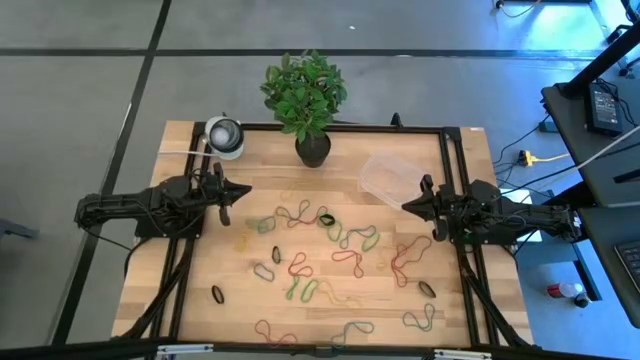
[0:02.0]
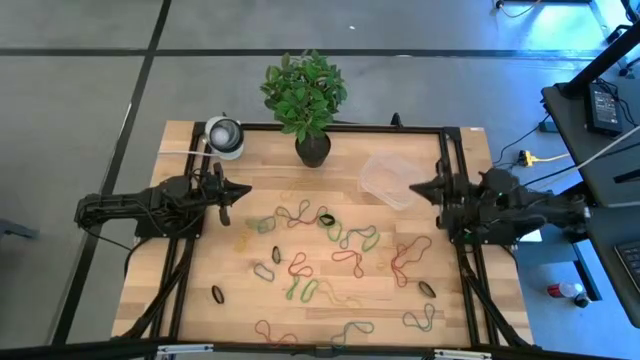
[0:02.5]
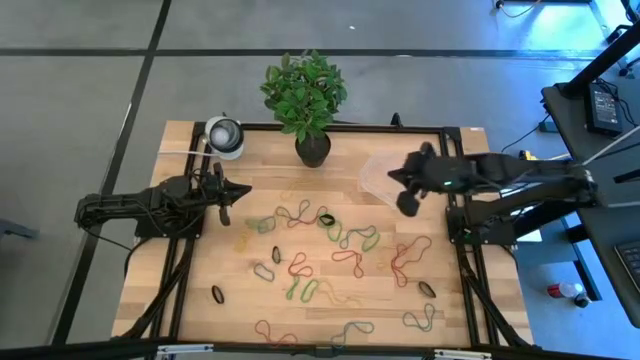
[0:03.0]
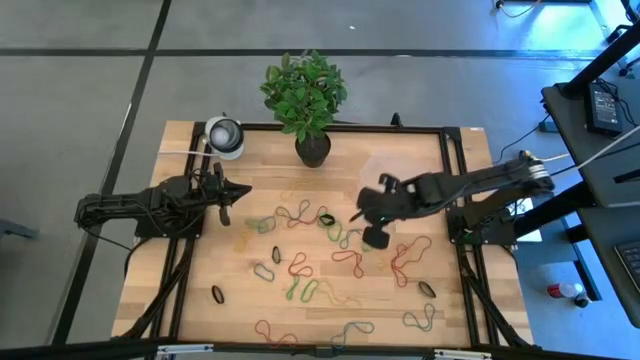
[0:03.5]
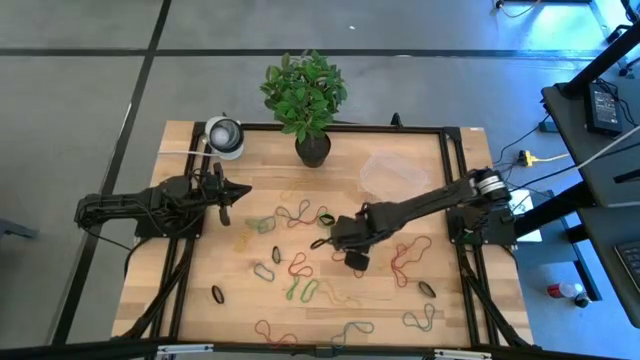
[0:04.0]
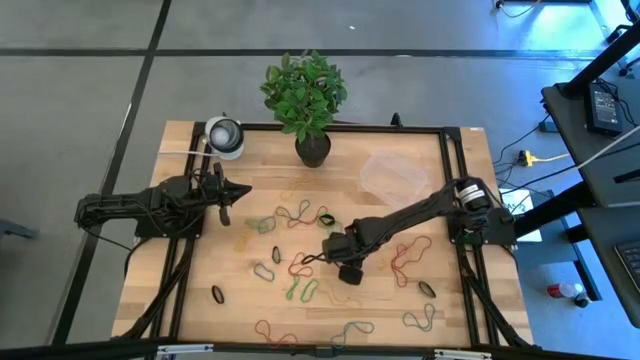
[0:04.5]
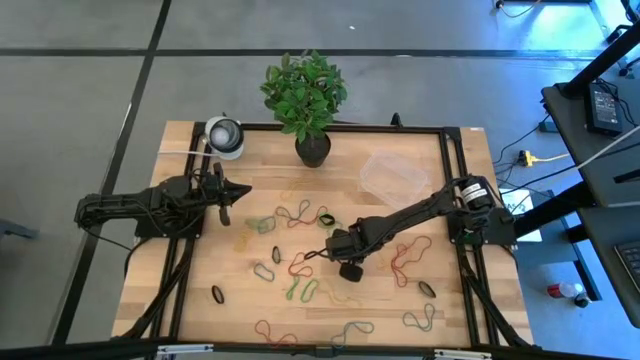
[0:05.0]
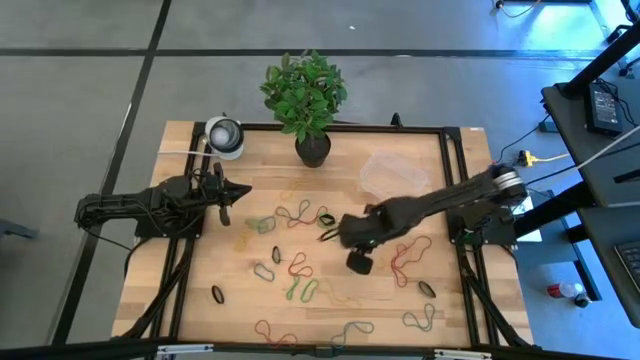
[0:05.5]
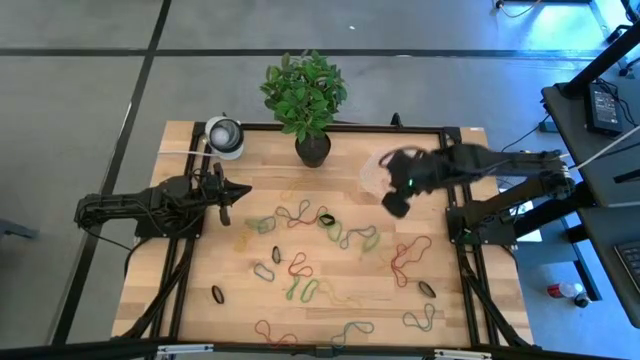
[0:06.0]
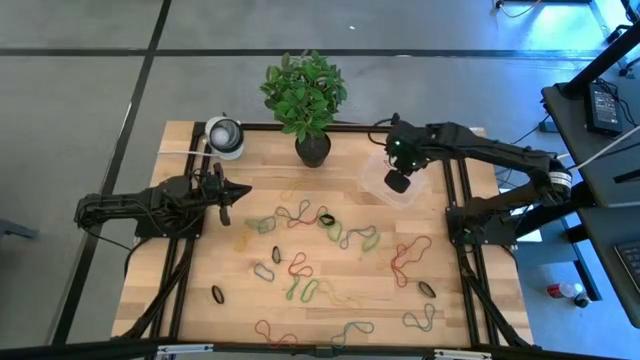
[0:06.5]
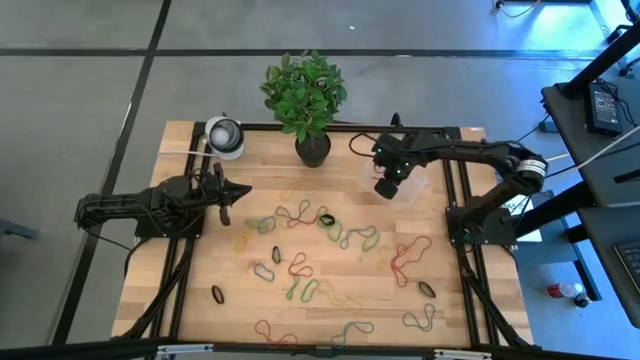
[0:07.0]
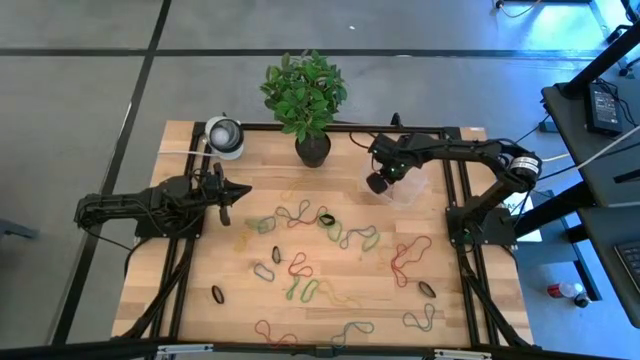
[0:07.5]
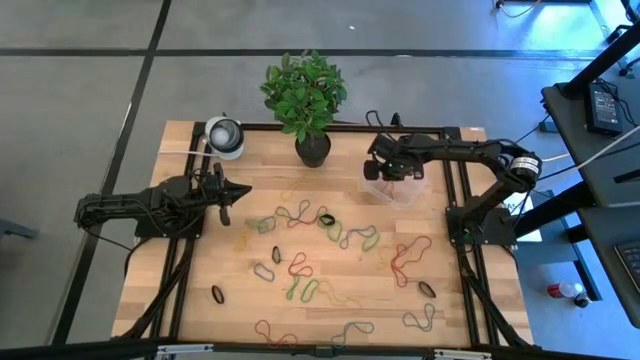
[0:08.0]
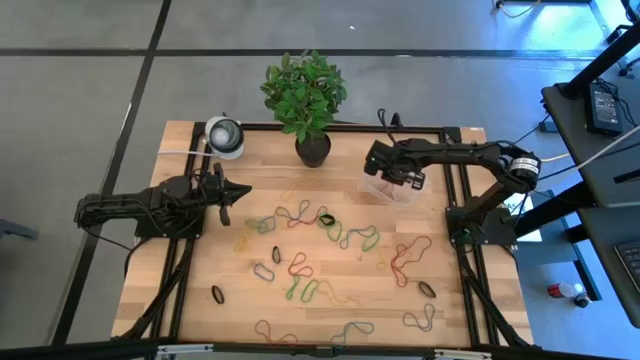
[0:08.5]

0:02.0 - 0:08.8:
Task: Pick and place rubber bands into bin
Put the red rubber band into the bin

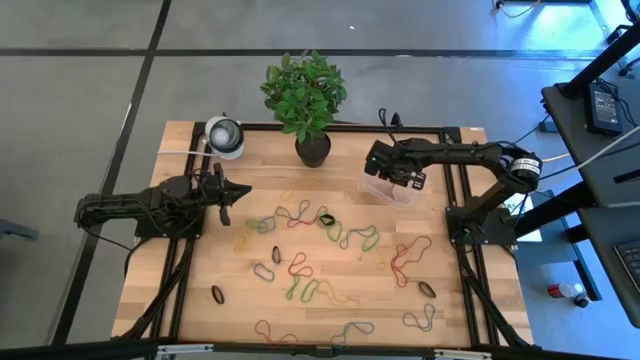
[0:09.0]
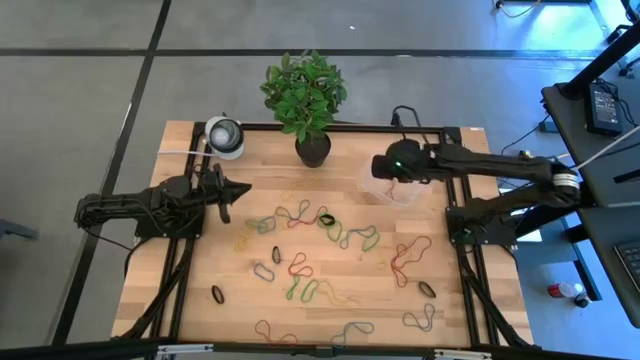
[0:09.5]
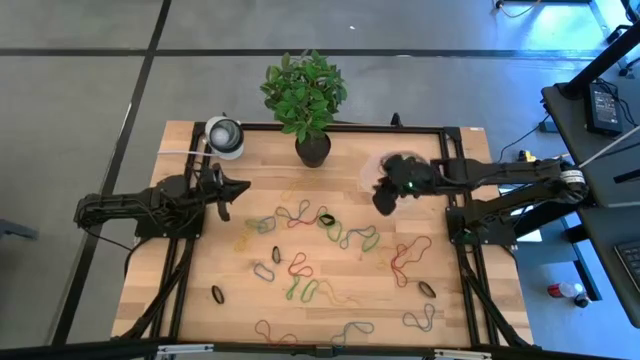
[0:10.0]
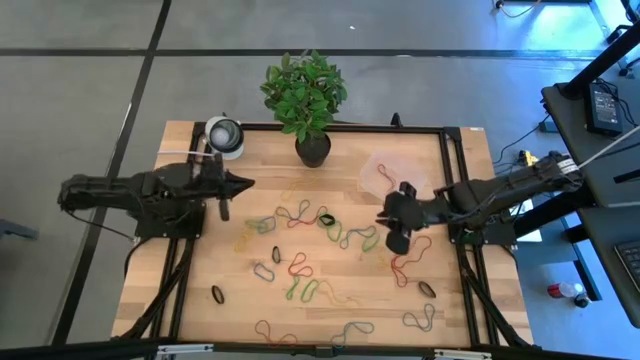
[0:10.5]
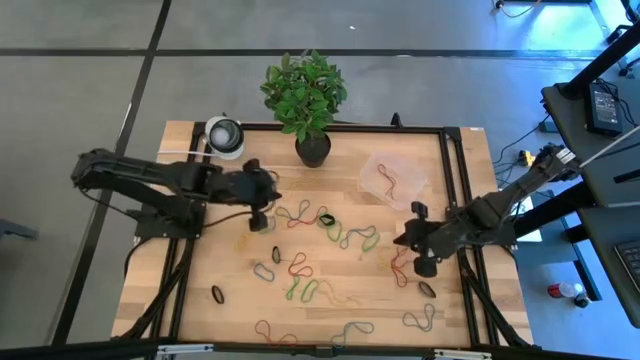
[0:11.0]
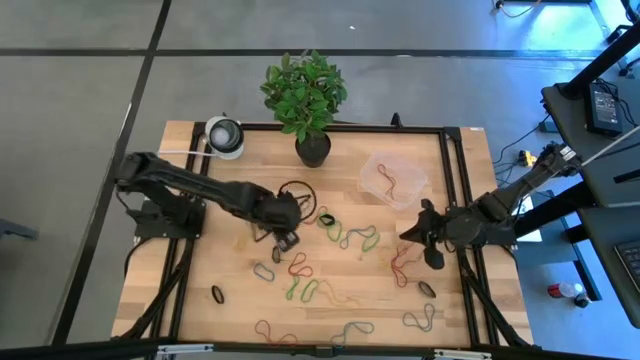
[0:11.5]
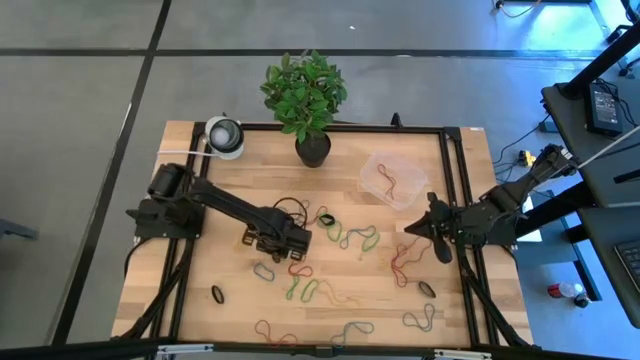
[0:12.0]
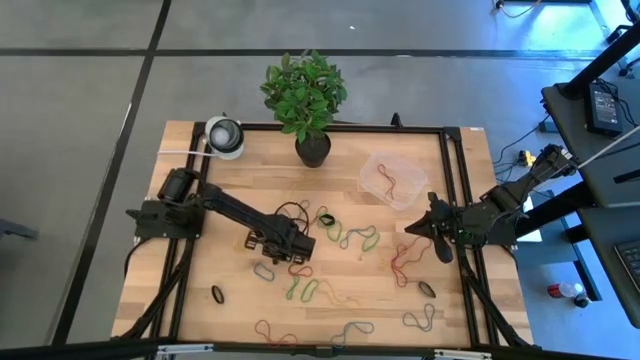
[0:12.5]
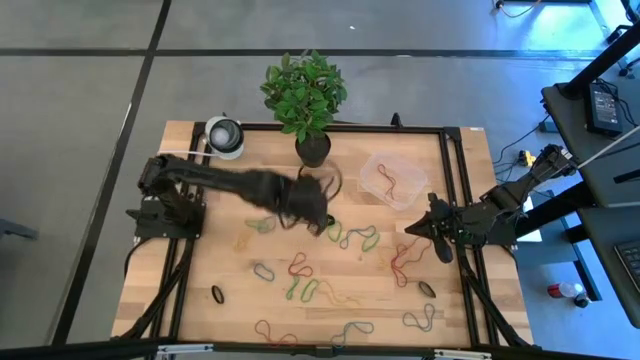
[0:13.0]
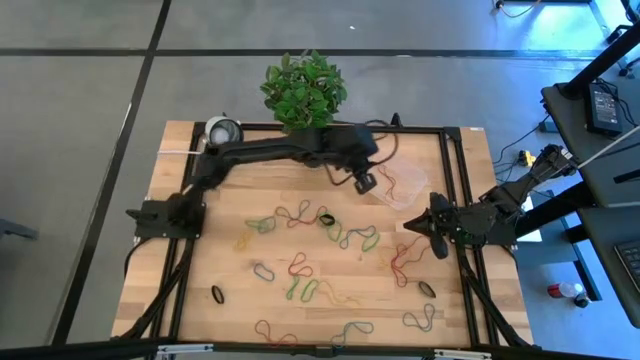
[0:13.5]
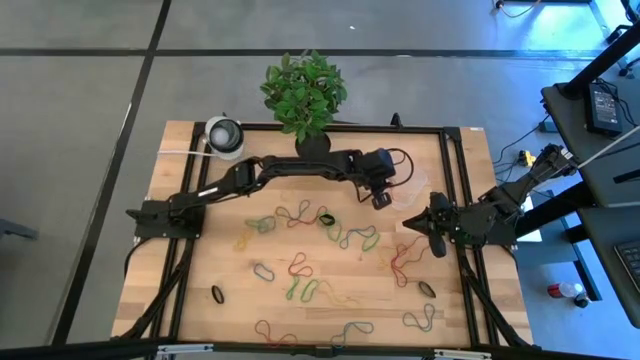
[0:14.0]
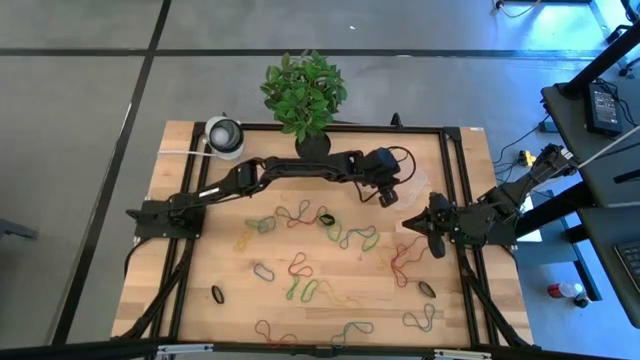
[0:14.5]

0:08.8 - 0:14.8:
Put the black rubber band into the bin

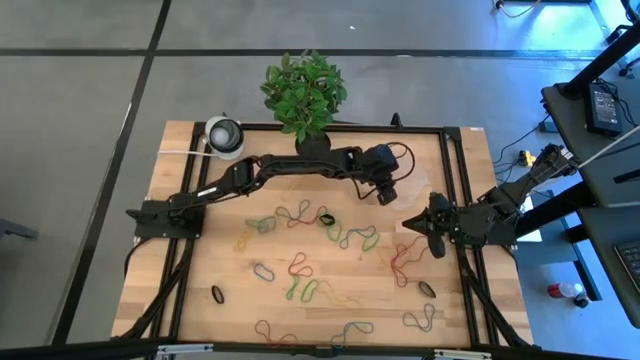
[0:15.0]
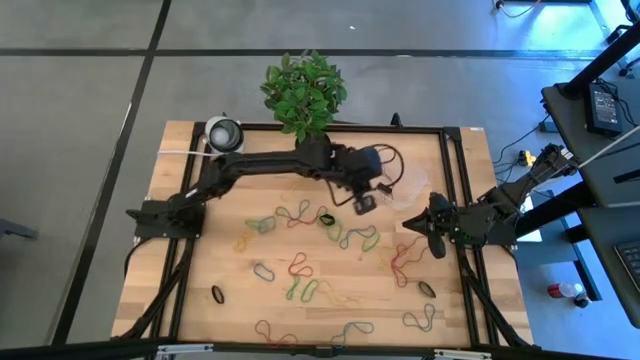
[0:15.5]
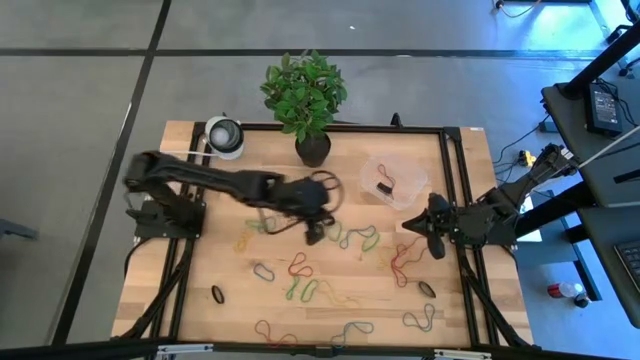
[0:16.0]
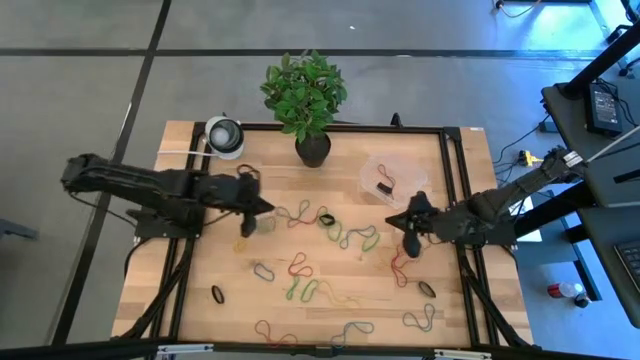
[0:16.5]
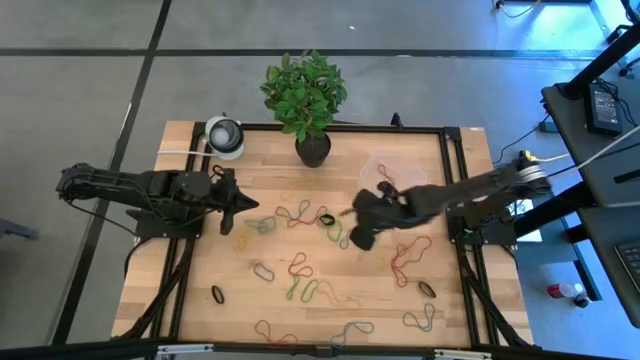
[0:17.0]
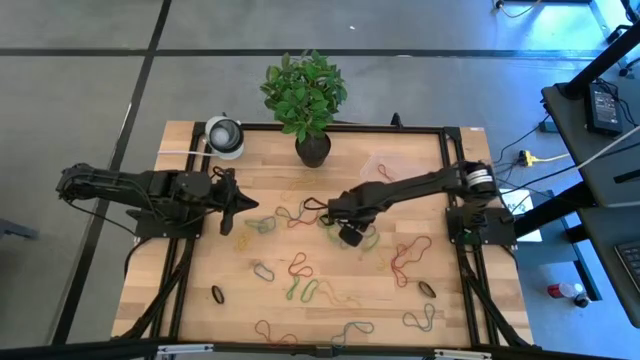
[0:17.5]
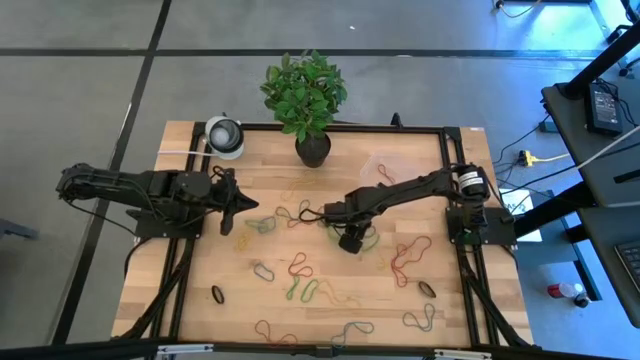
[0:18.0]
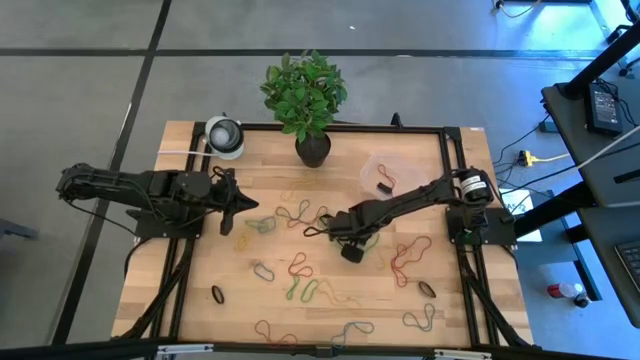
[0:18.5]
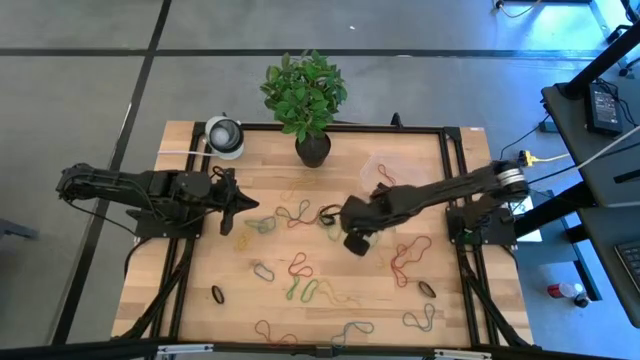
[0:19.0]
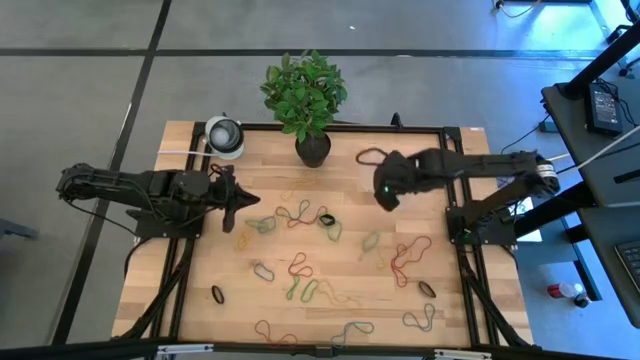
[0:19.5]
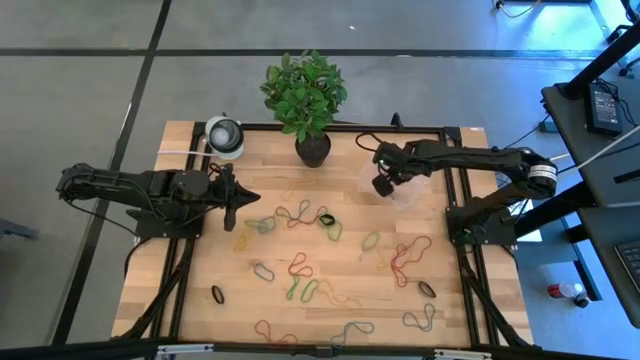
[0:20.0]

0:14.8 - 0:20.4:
Put the blue rubber band into the bin

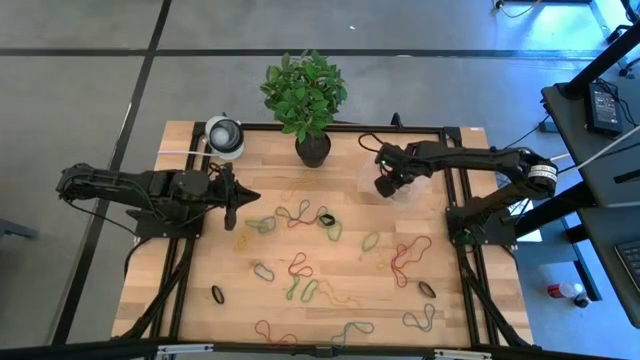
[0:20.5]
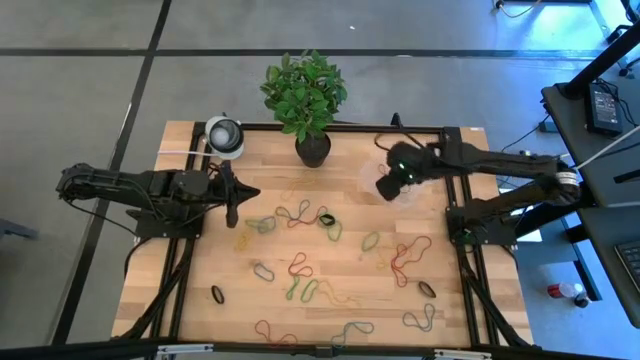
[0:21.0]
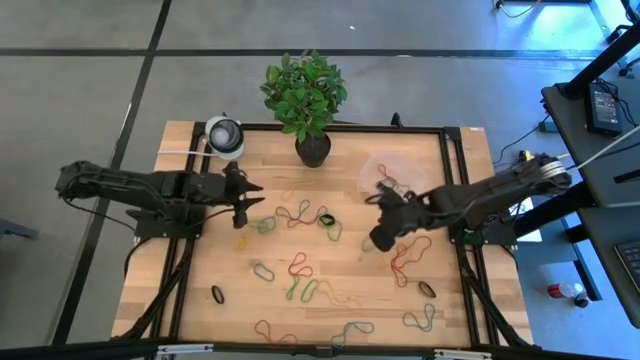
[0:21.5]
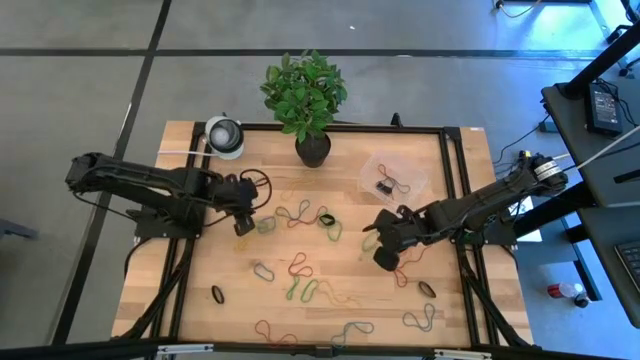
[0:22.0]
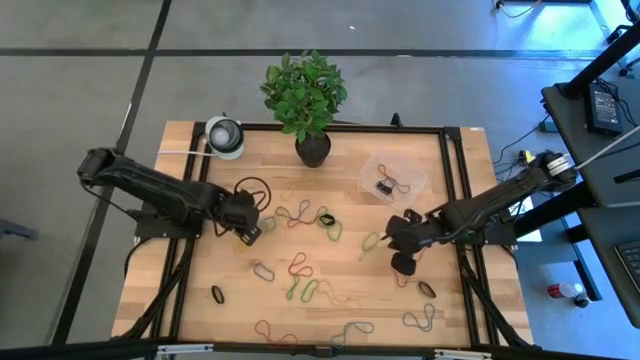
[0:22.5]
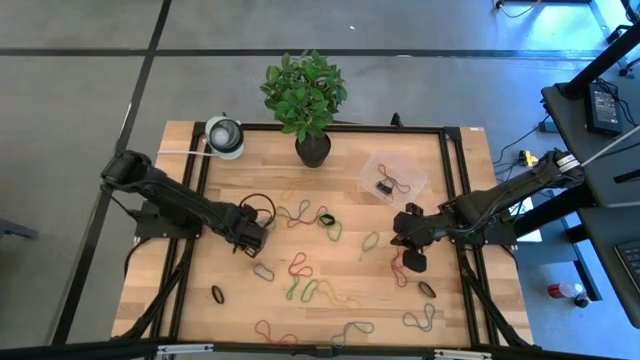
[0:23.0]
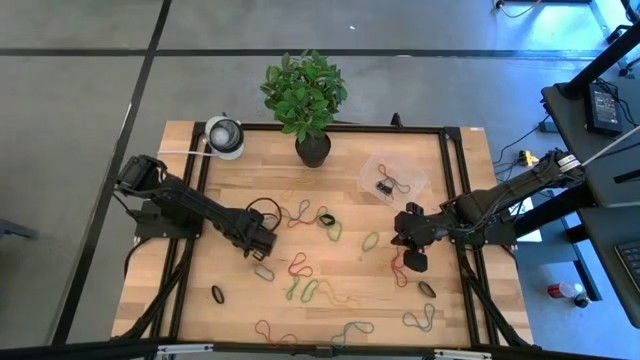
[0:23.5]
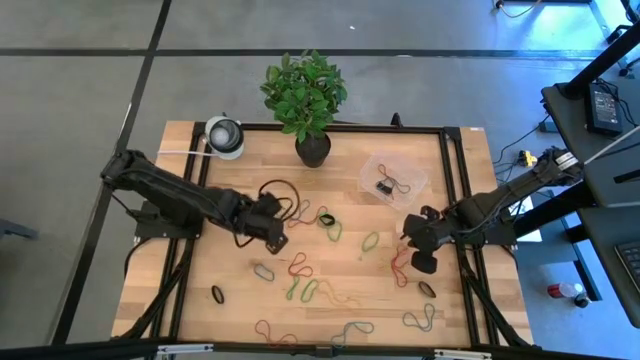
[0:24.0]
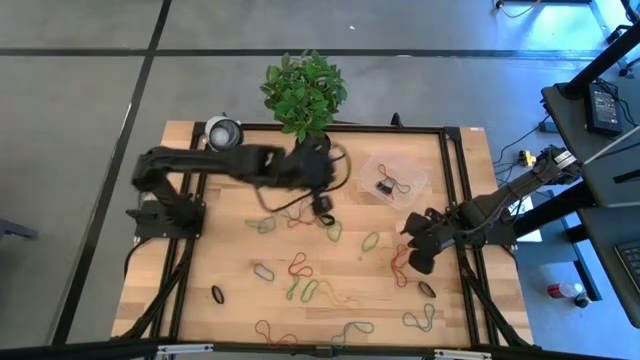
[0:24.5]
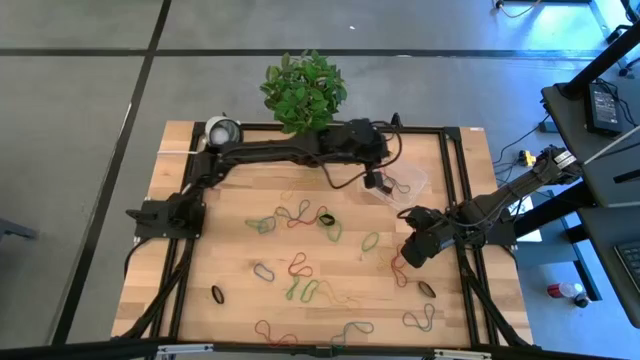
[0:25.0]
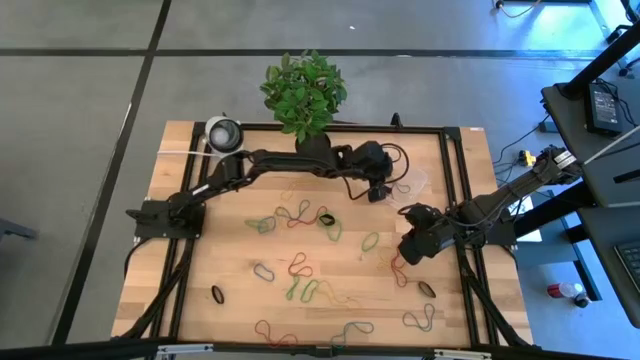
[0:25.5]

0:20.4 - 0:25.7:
Put the yellow rubber band into the bin
